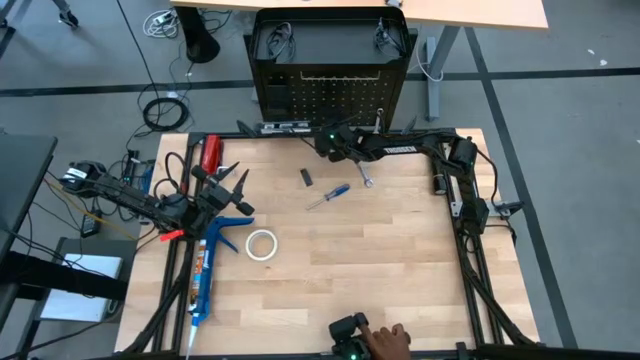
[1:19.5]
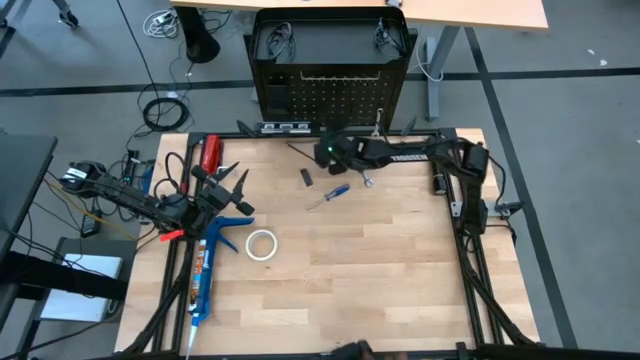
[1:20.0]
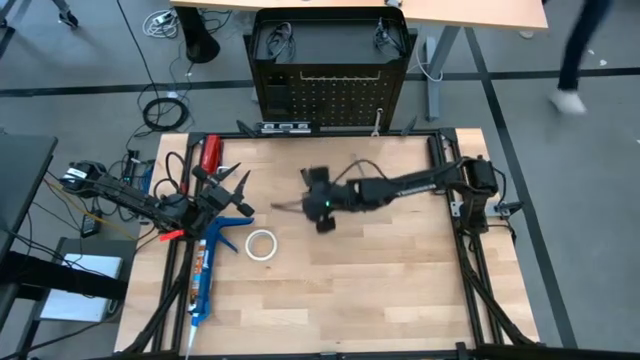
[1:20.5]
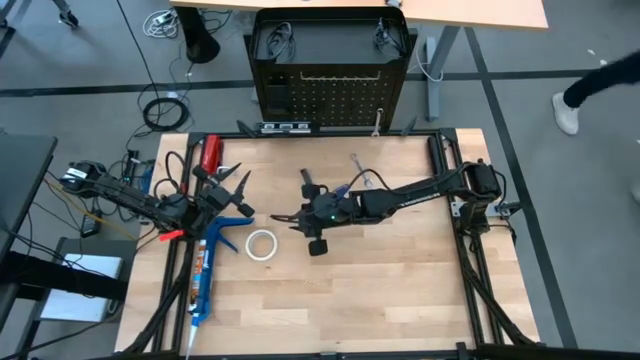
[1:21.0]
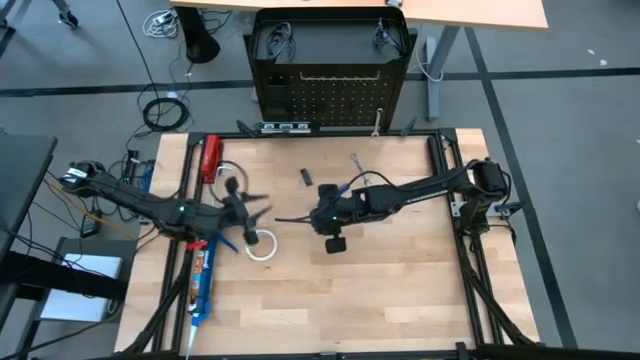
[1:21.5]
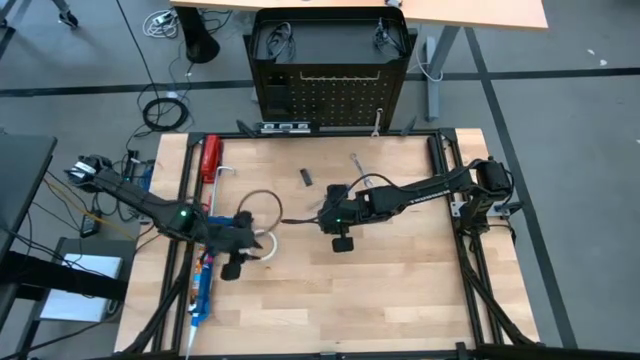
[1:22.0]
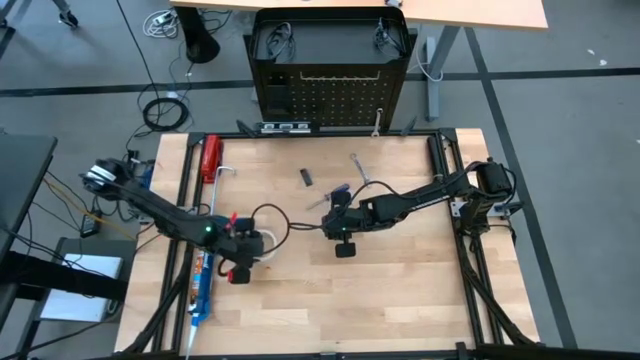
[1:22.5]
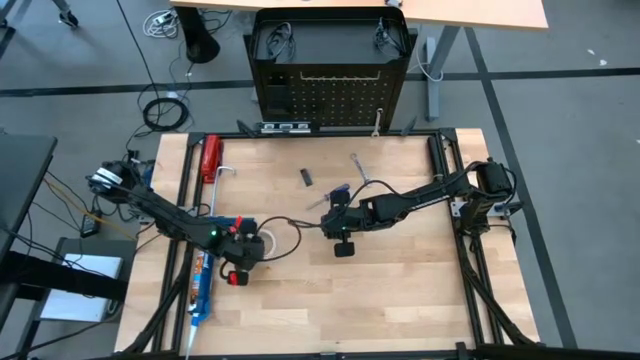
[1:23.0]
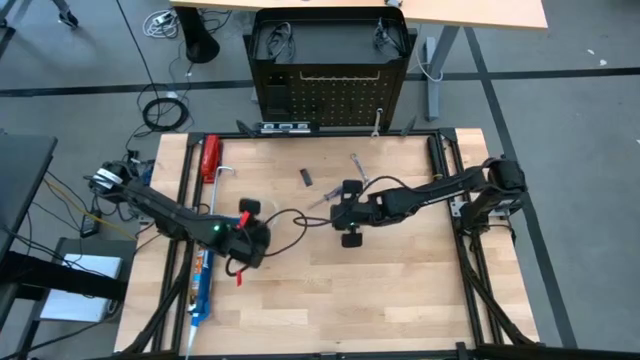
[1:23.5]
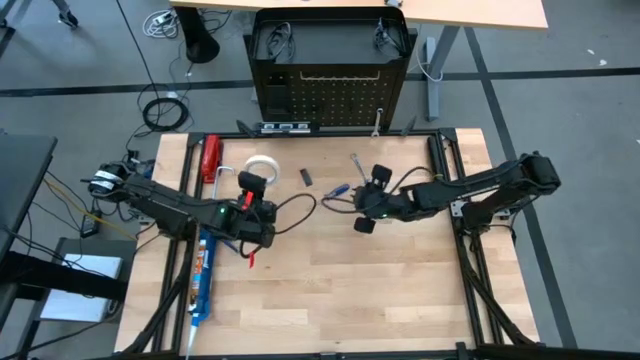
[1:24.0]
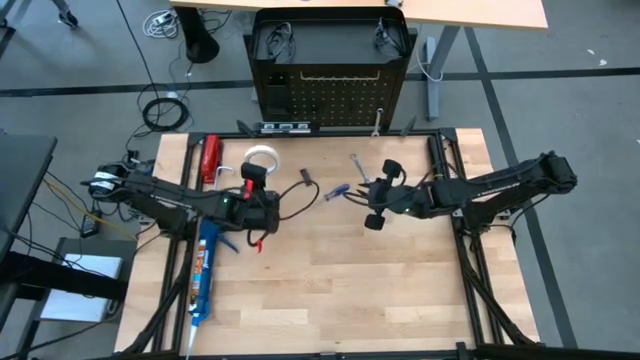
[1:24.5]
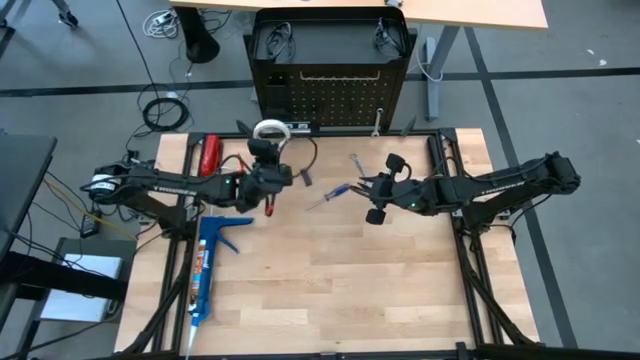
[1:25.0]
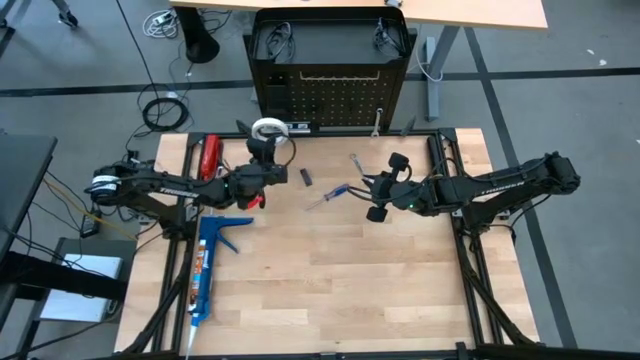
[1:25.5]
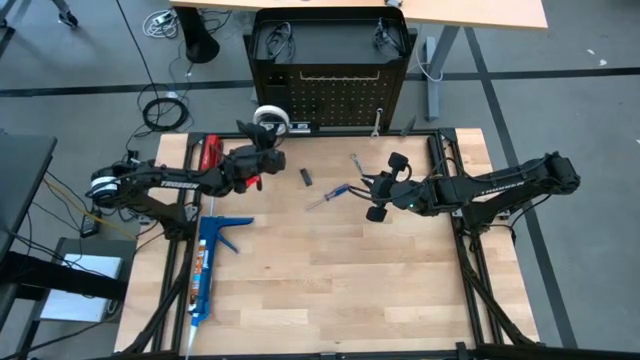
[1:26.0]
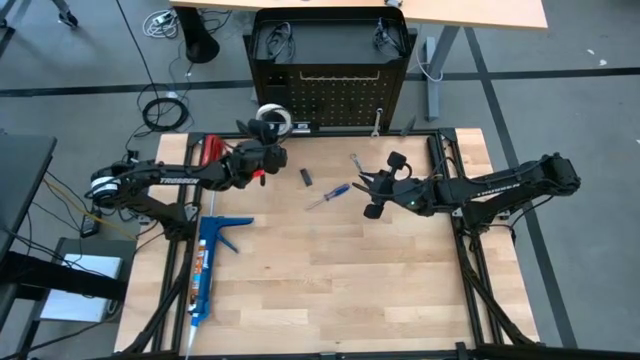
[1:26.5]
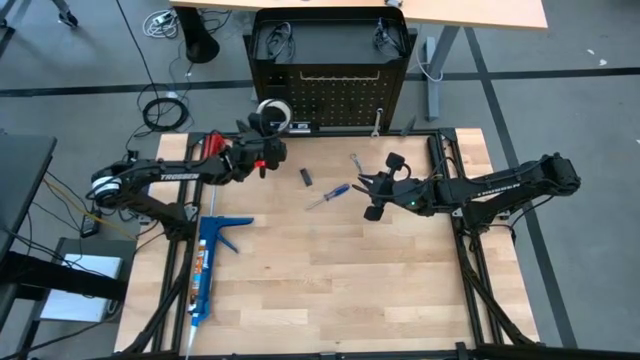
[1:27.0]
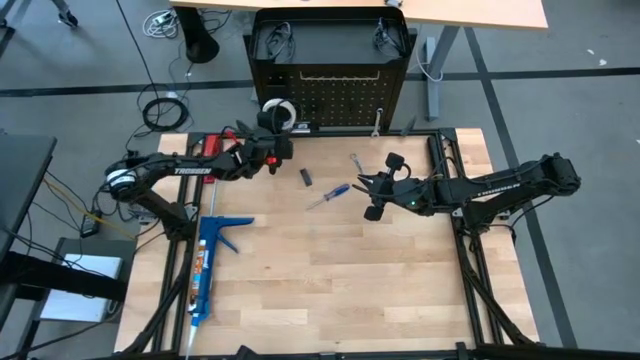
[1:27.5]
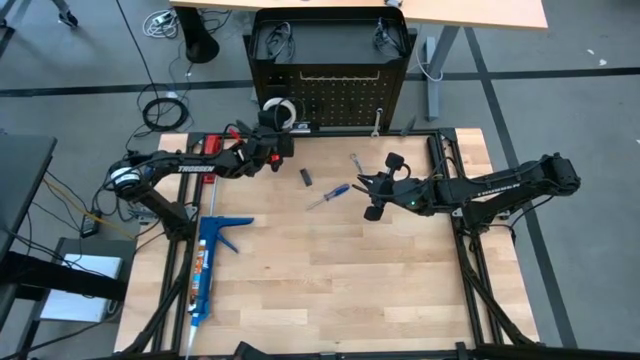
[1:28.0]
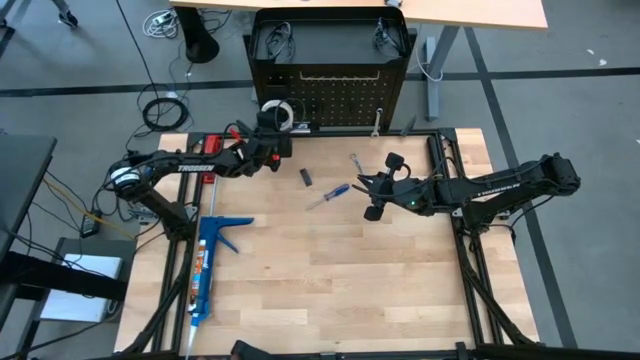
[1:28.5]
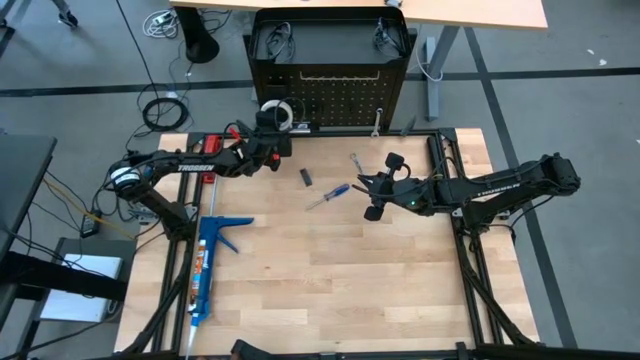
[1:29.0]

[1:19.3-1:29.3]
Task: Hang tools onto peg board
Hang the tape onto the black pegboard

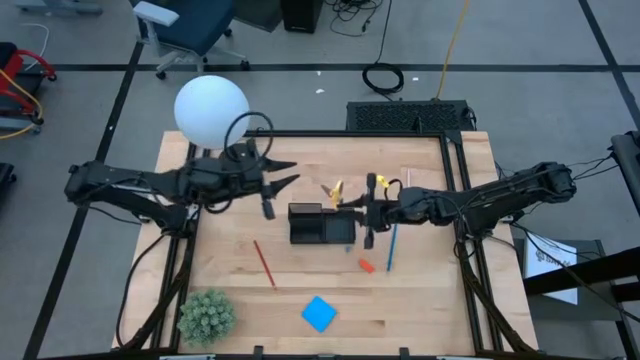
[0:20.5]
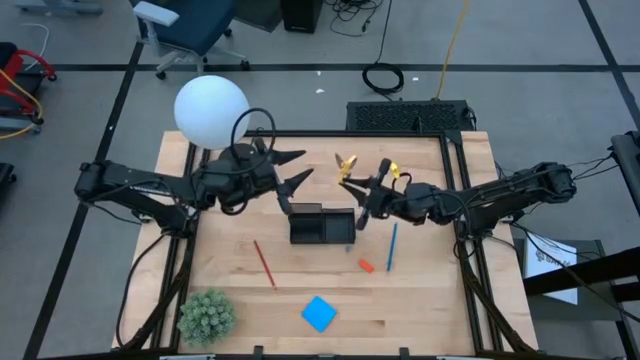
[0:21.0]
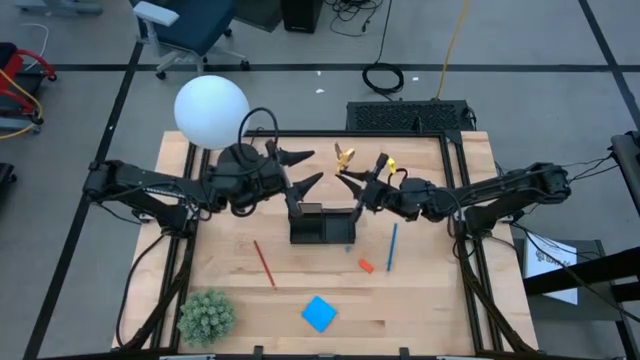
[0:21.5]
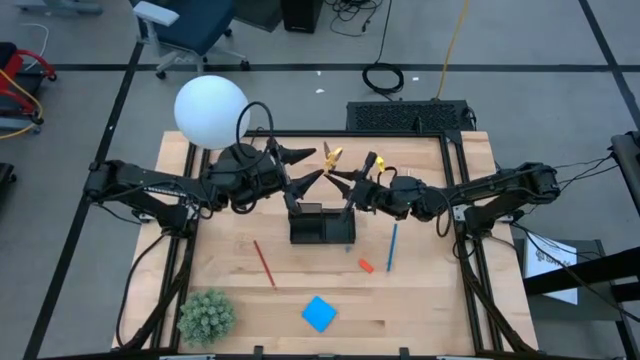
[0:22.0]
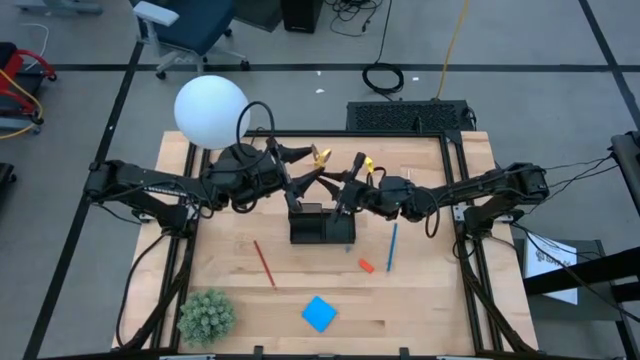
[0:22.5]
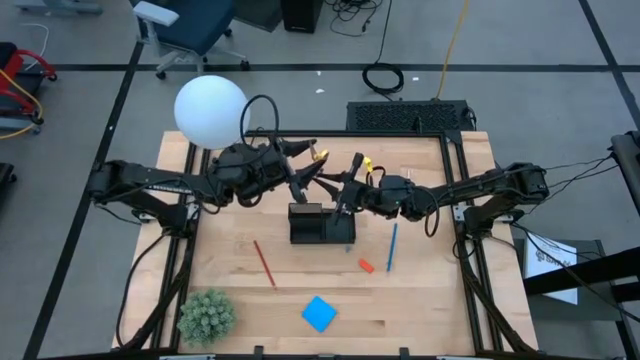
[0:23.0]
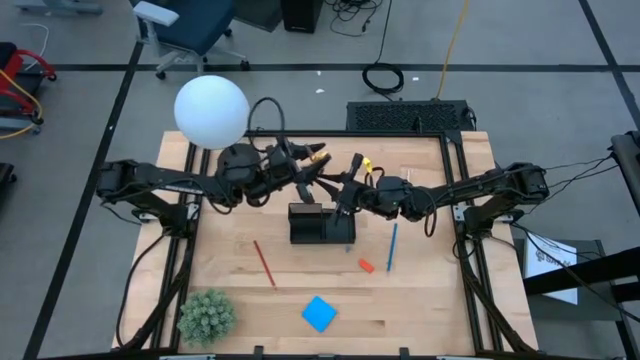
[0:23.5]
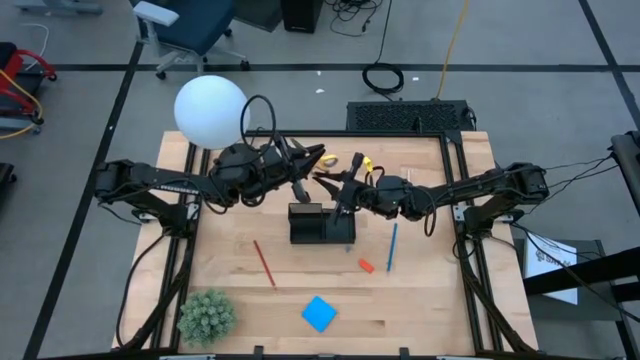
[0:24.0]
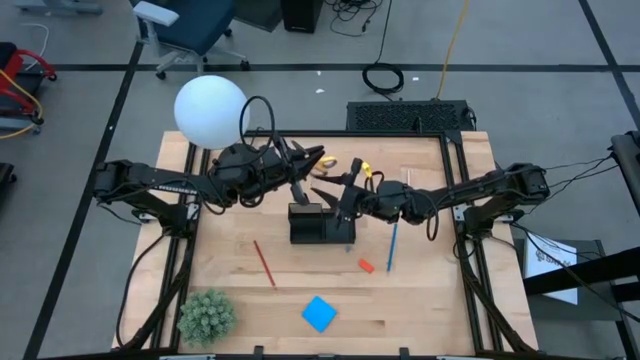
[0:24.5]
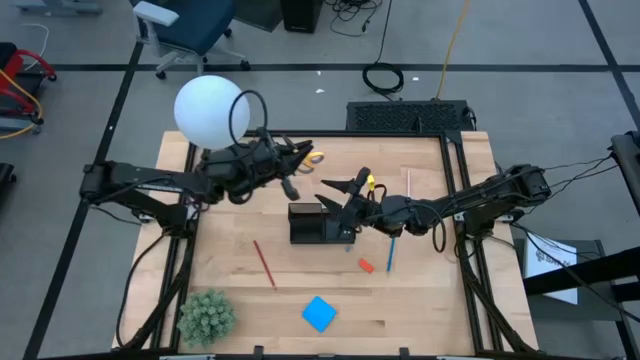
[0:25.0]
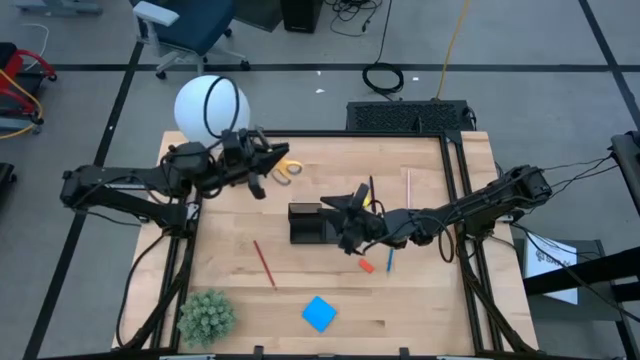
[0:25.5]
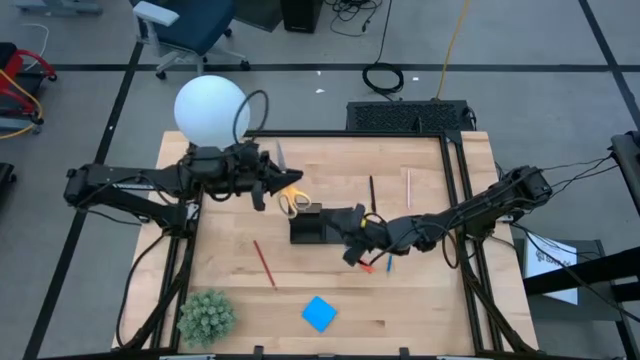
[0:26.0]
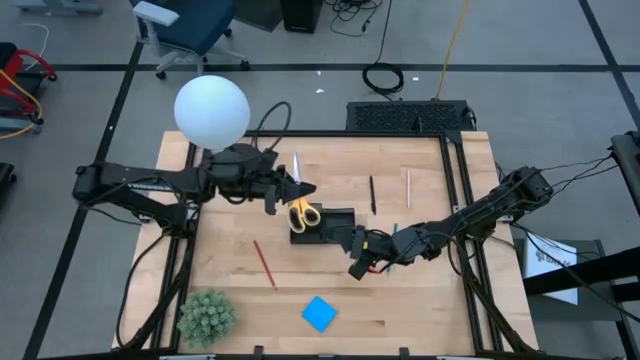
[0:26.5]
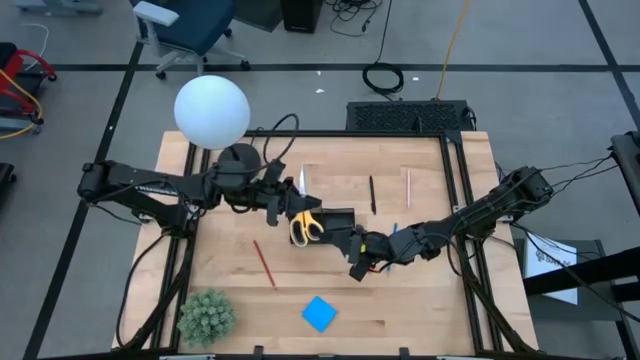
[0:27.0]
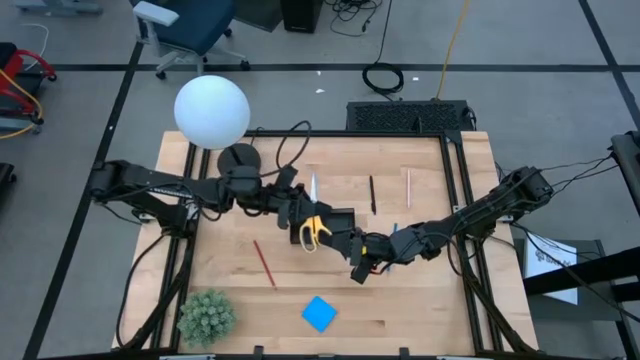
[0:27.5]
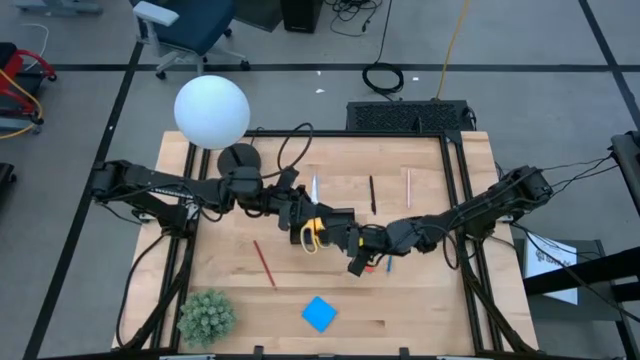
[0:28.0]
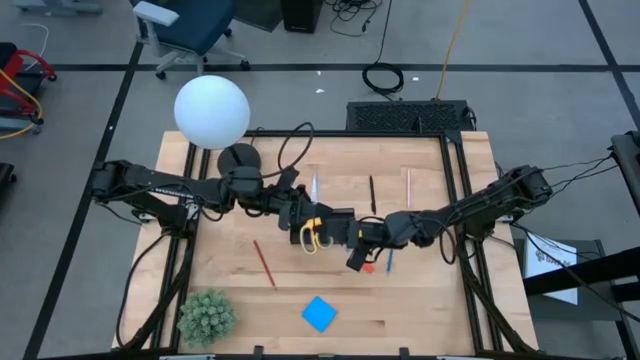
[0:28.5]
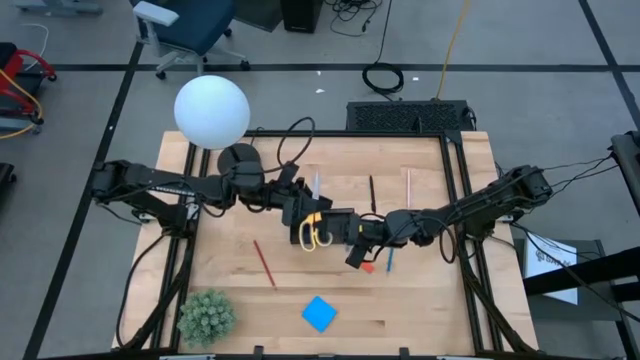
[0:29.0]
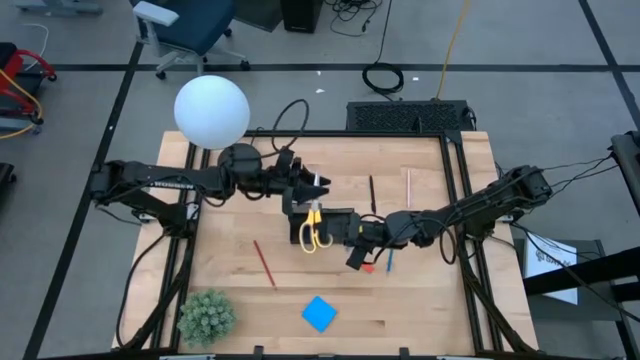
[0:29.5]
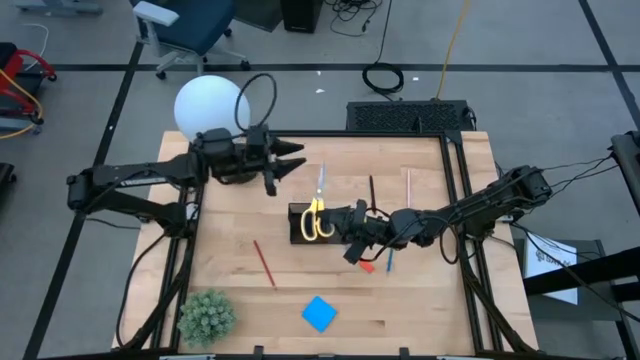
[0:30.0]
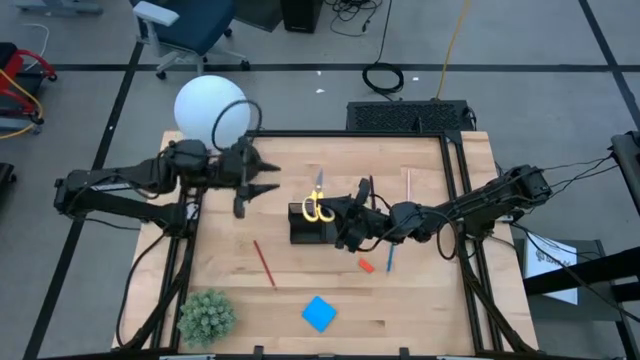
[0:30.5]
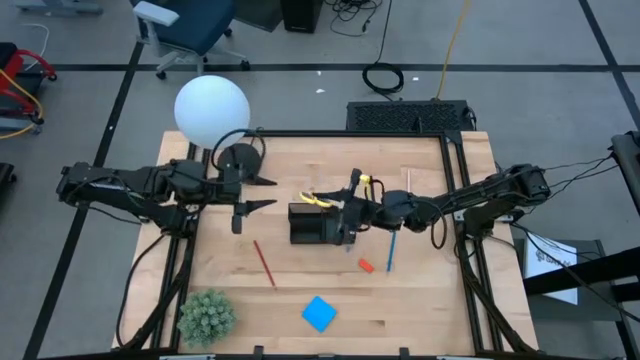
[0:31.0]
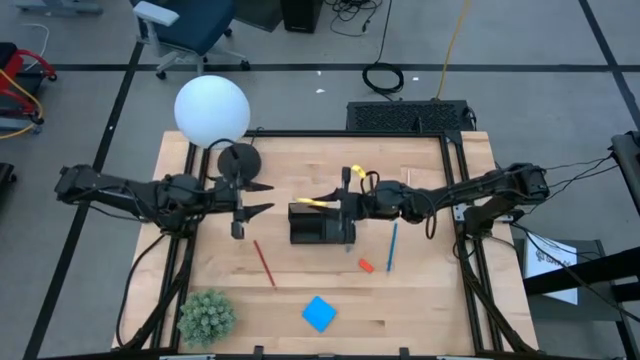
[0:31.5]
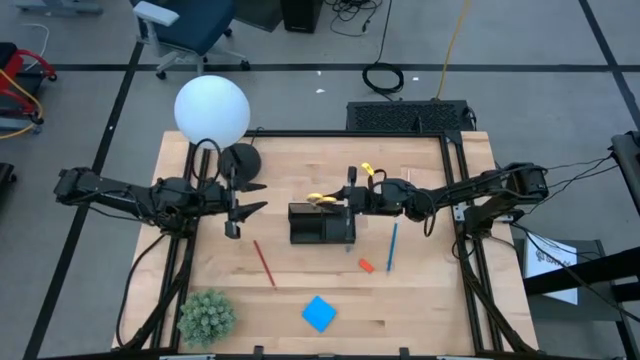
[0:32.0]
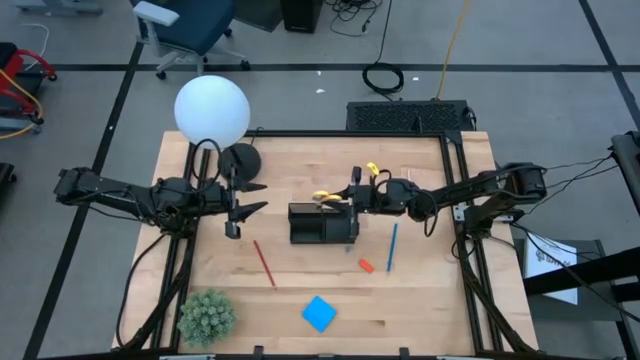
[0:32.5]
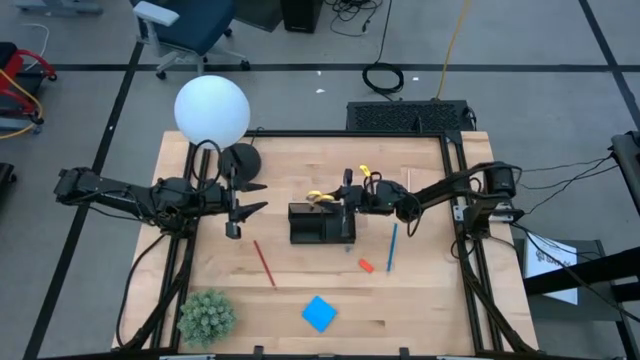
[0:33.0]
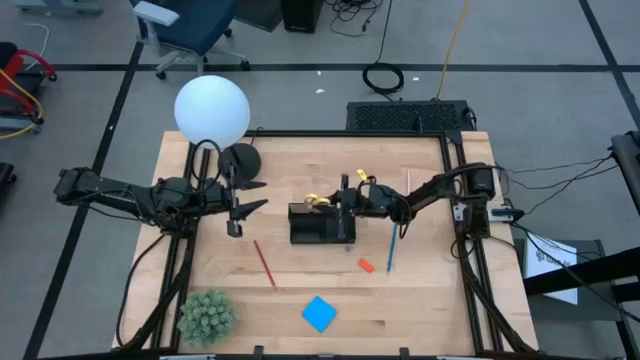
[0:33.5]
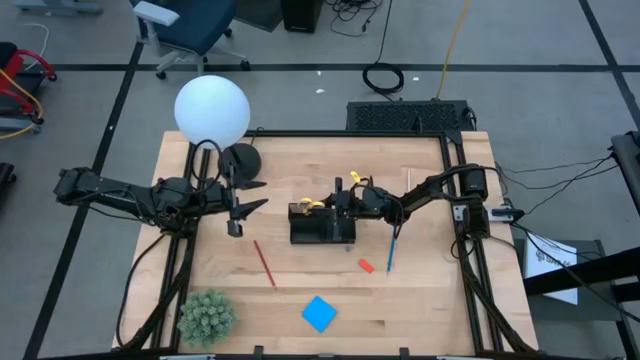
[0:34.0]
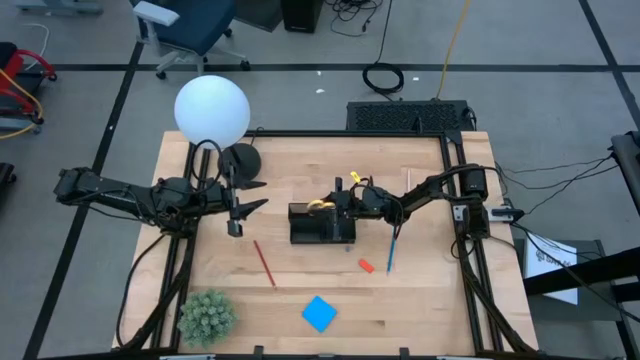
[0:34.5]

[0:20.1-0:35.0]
Task: Pick and place office supplies into organizer
Put the yellow scissors into the desk organizer
